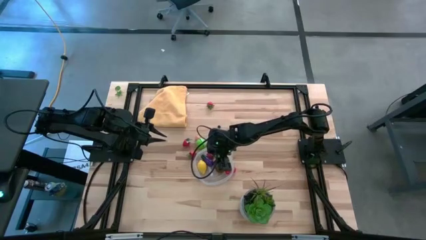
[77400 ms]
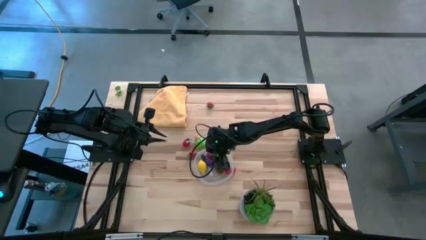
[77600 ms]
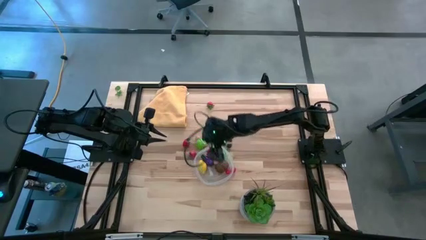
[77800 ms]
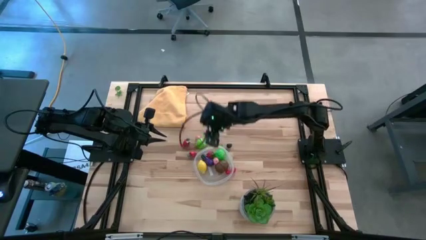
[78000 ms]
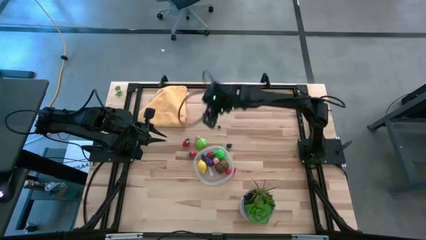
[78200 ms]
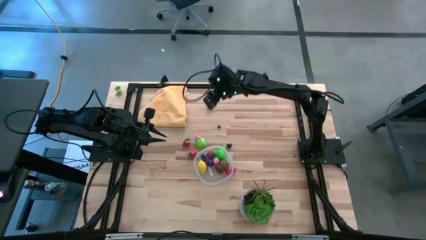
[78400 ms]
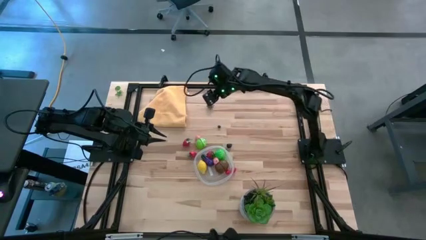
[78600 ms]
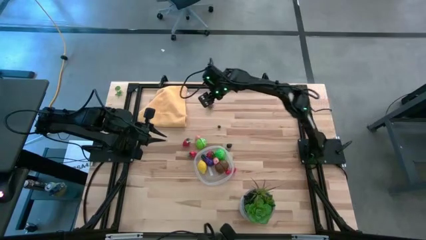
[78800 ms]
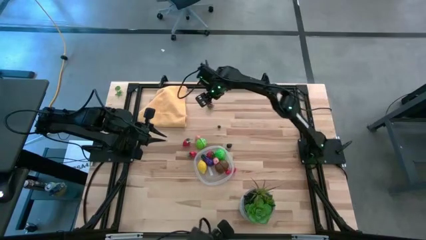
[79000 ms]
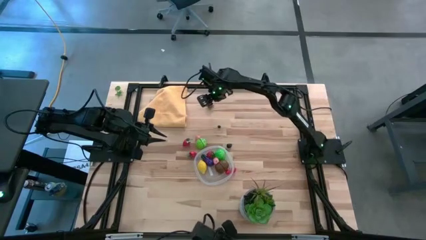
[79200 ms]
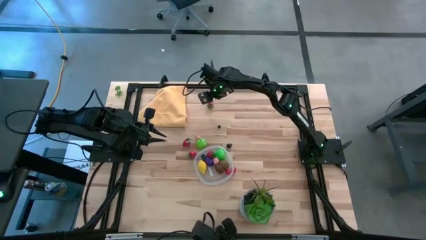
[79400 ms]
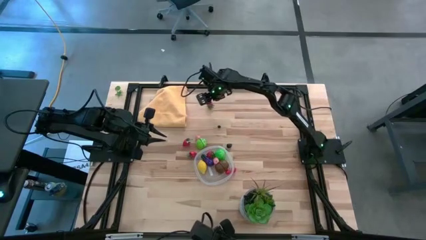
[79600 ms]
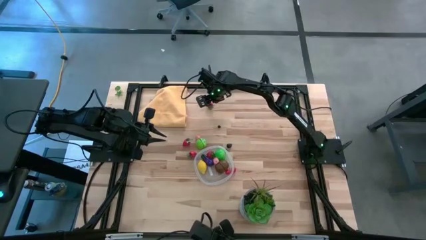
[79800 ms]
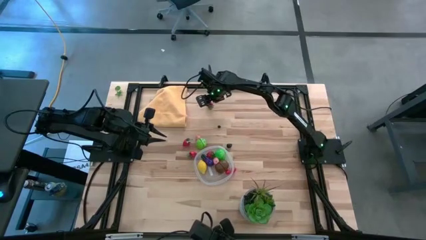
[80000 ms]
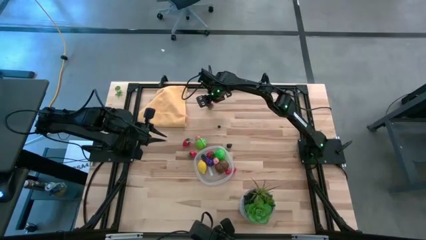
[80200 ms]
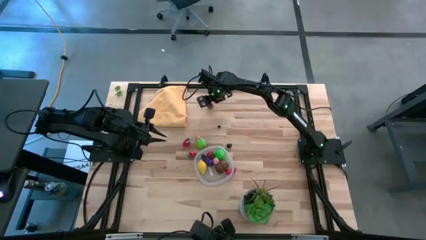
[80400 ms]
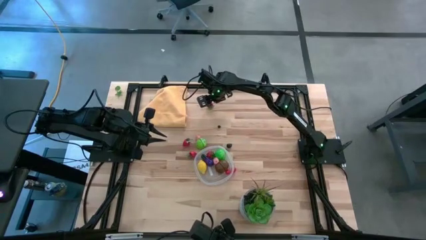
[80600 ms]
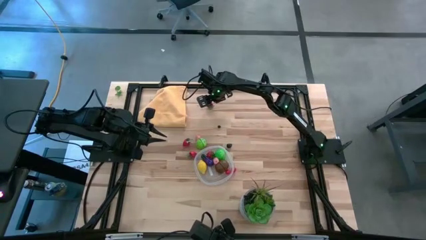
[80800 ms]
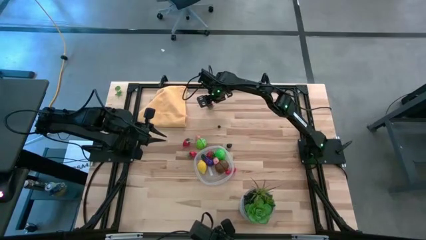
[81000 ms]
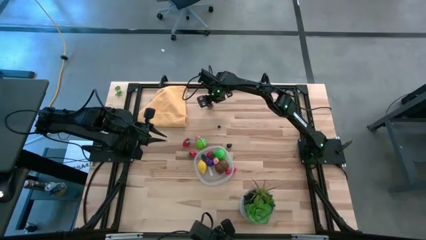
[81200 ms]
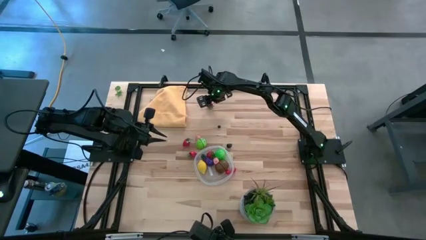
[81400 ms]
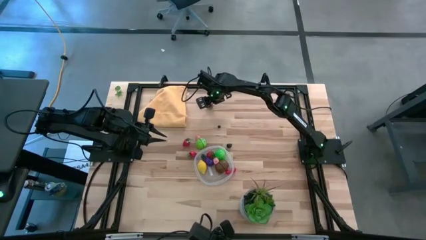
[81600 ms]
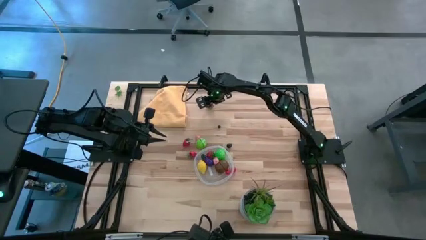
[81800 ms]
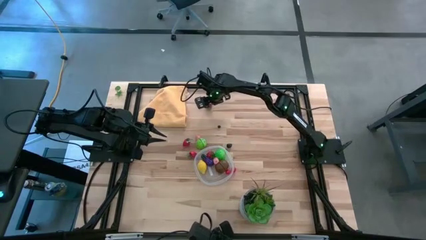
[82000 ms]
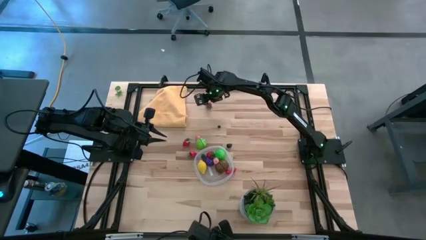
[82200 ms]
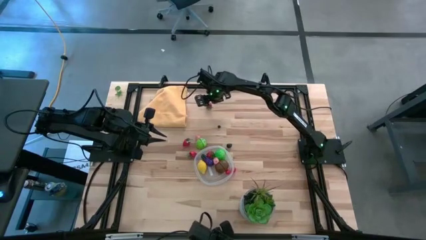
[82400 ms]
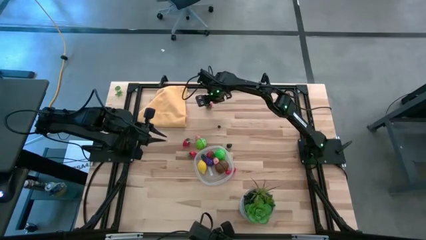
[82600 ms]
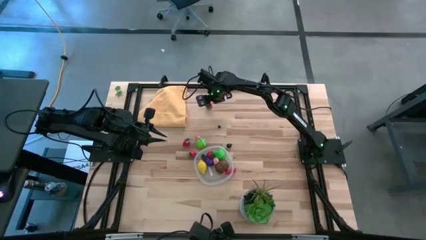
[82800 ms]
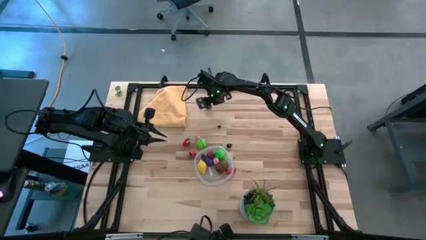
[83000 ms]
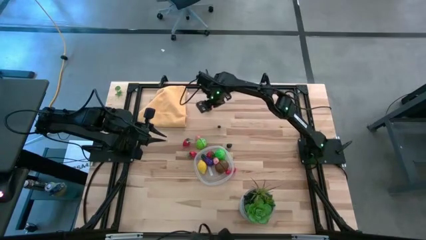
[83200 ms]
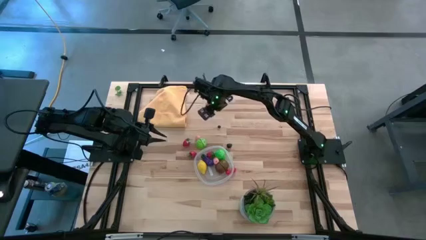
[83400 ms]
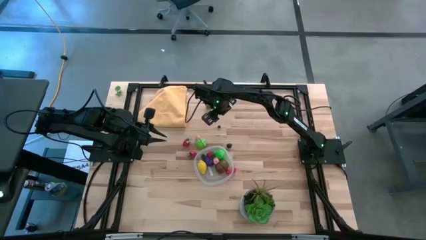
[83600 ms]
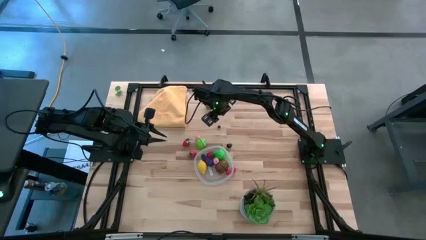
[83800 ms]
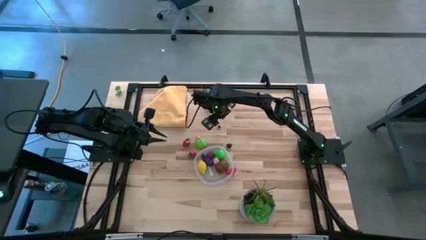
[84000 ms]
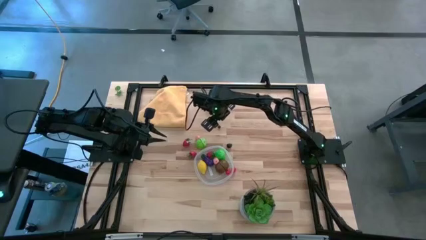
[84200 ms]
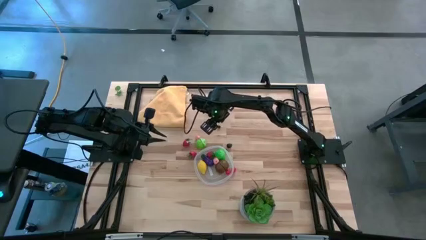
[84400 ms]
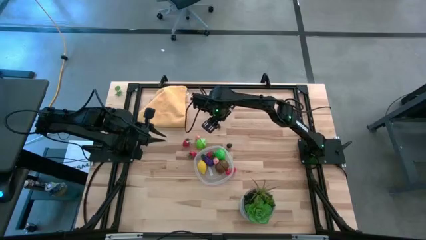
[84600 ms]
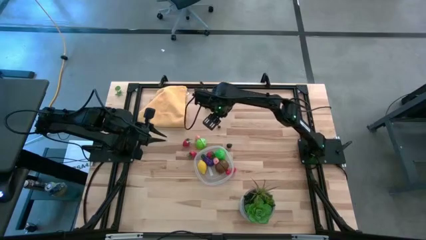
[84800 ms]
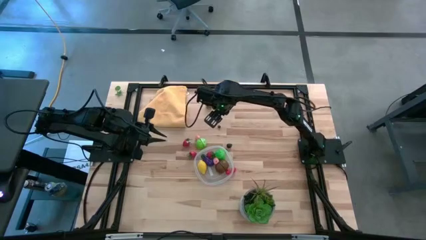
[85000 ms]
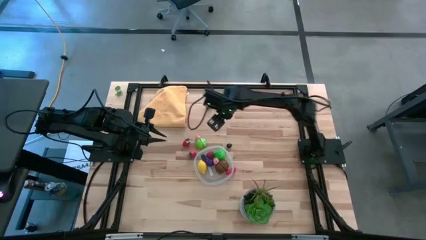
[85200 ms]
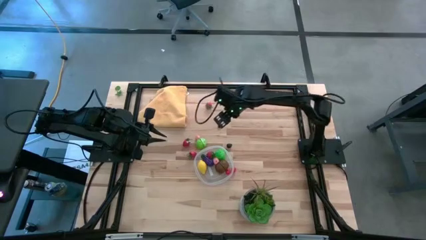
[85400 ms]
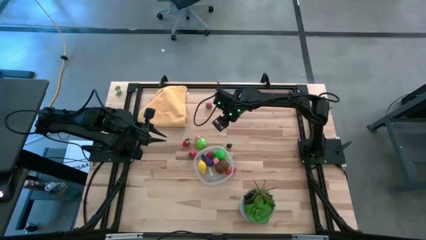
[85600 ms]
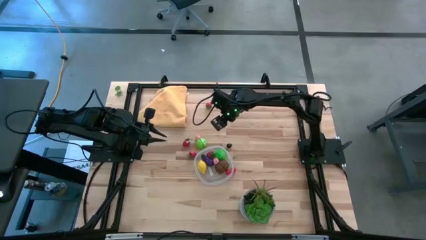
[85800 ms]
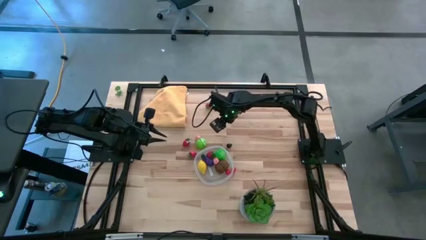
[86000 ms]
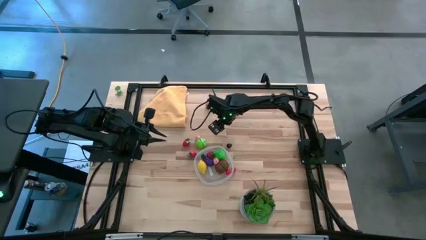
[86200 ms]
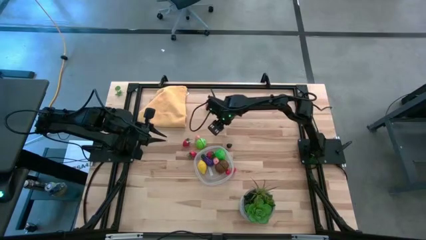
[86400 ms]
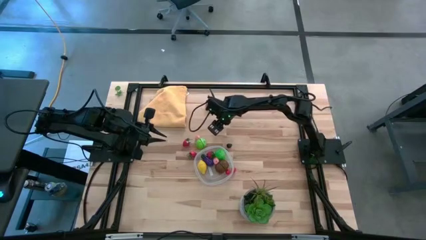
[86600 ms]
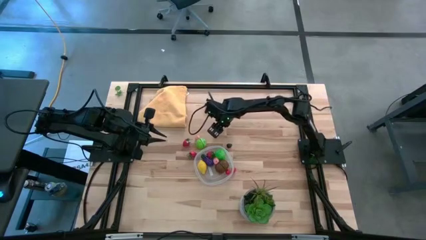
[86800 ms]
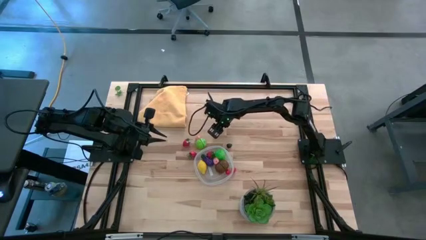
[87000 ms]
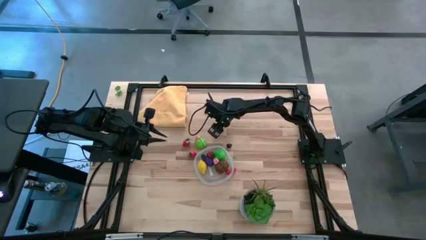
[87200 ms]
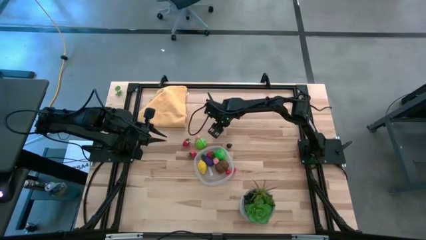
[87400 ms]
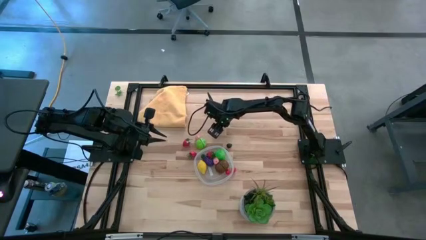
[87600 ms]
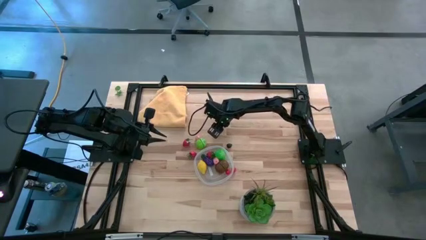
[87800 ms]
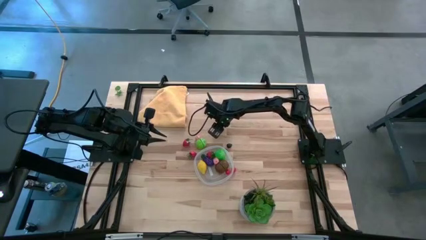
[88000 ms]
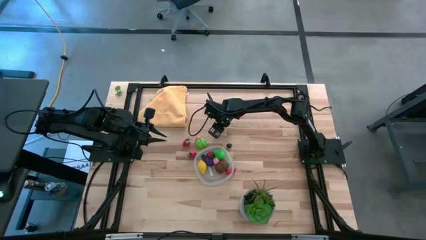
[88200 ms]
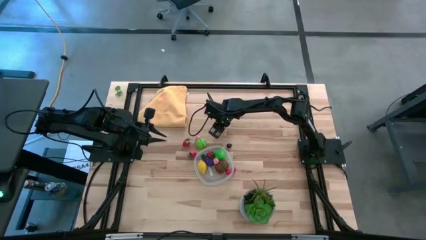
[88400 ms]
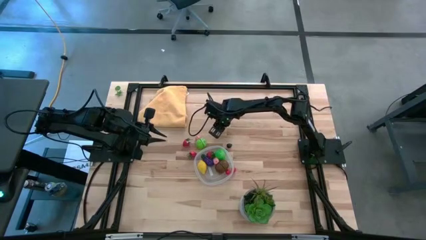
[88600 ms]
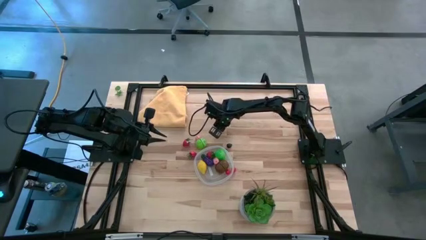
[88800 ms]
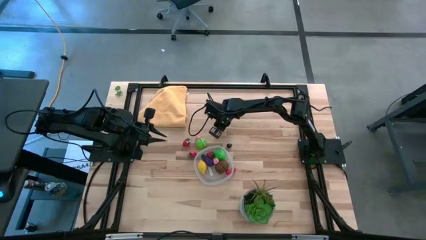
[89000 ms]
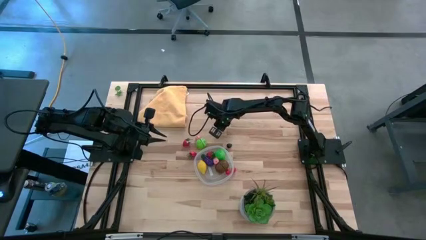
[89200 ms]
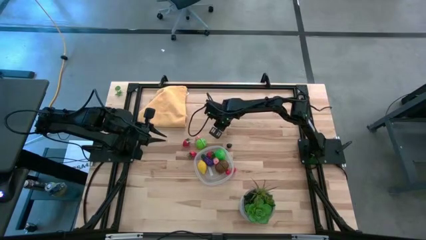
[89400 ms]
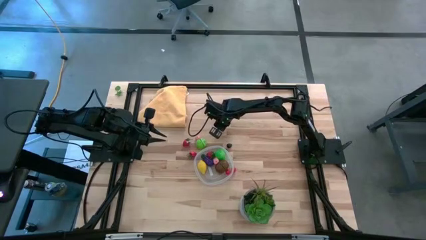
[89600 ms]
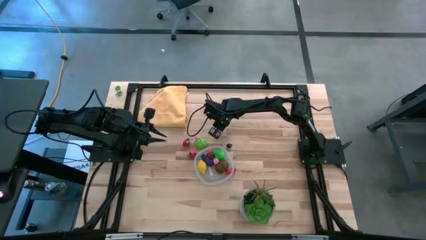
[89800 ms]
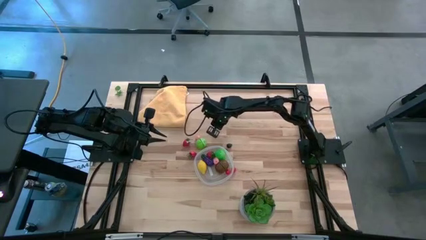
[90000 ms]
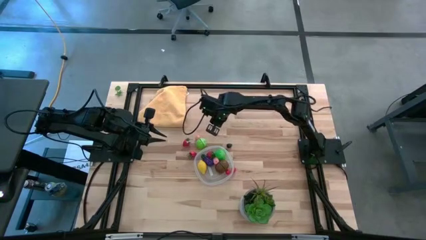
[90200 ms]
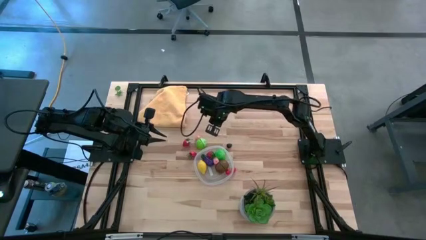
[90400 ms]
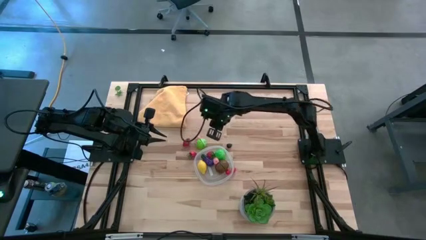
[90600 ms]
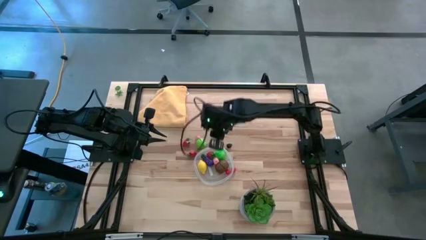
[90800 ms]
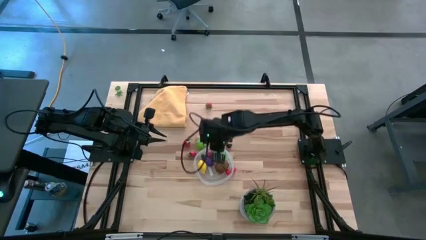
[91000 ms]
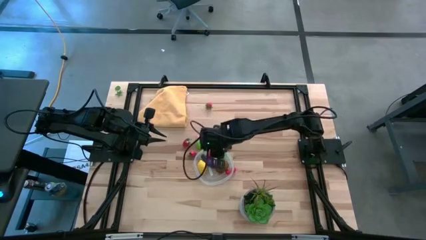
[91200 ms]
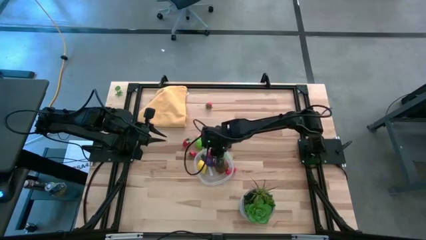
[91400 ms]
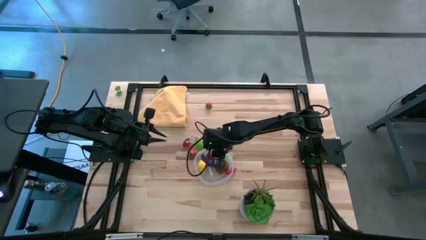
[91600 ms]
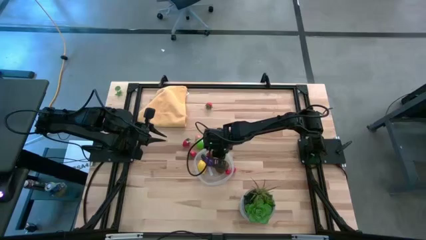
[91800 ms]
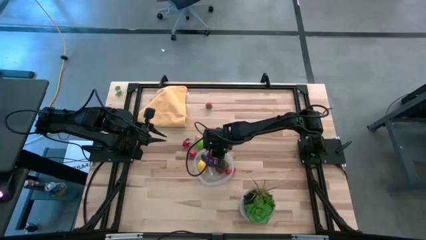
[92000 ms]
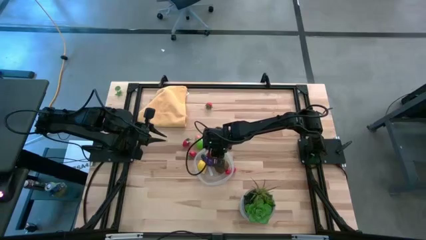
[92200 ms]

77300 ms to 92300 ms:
Task: Pick and placing Produce into tupperware
Put the blueberries into the transparent bin

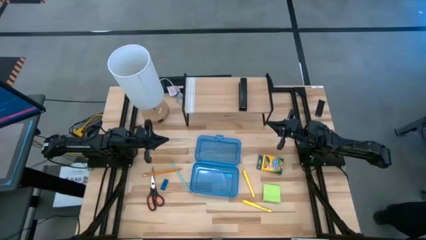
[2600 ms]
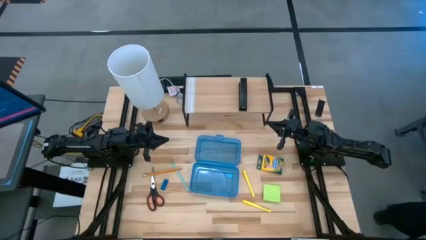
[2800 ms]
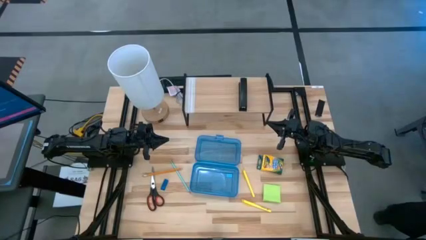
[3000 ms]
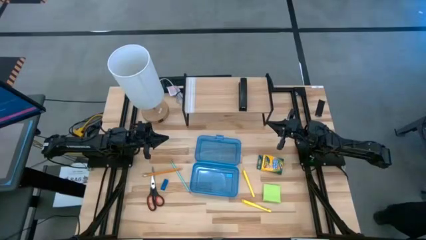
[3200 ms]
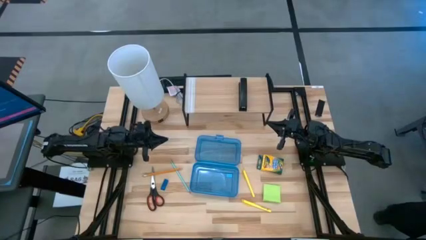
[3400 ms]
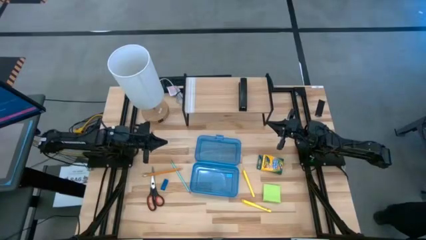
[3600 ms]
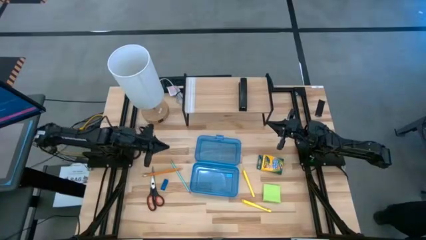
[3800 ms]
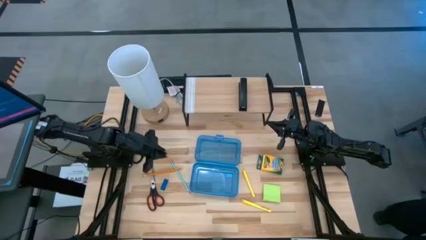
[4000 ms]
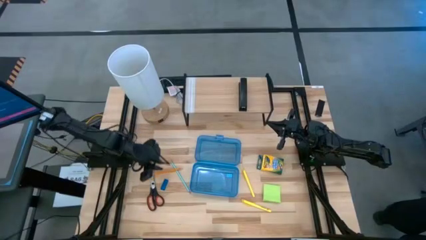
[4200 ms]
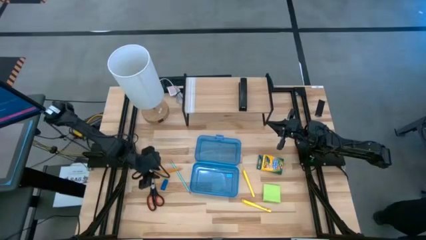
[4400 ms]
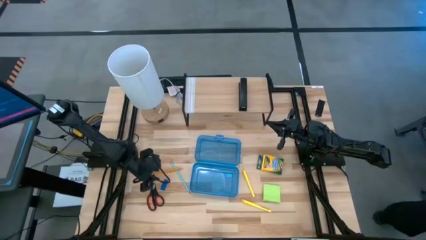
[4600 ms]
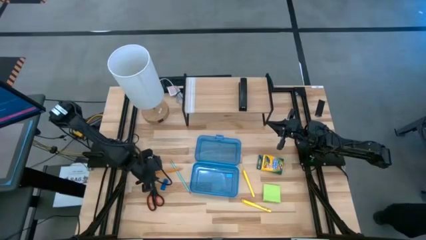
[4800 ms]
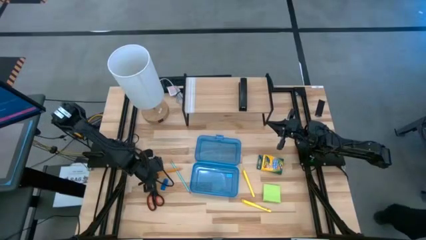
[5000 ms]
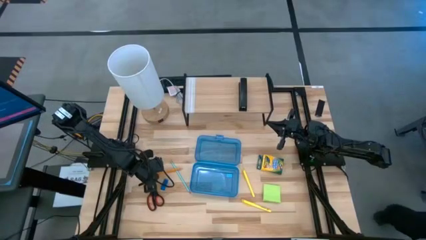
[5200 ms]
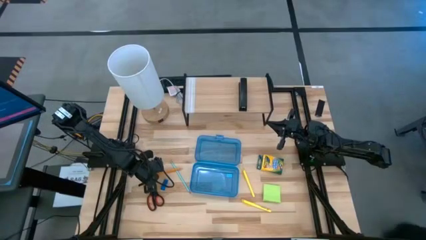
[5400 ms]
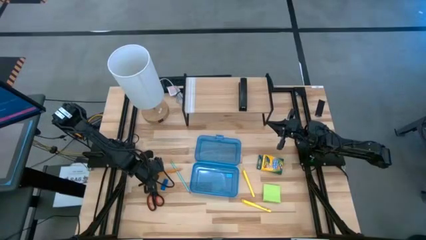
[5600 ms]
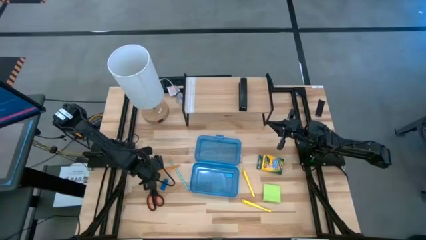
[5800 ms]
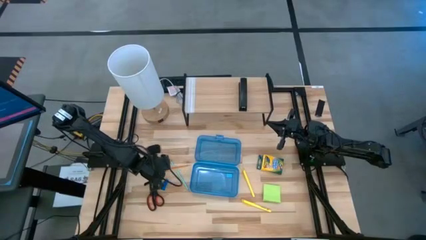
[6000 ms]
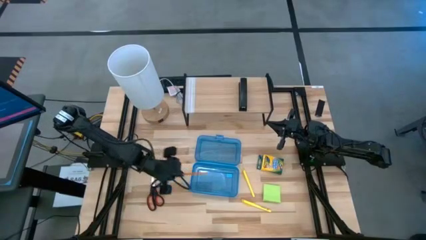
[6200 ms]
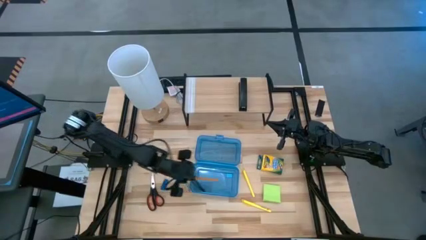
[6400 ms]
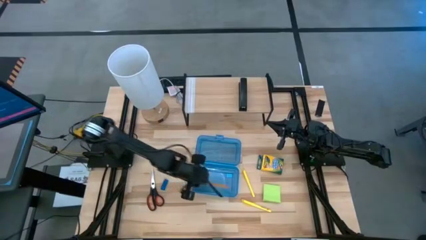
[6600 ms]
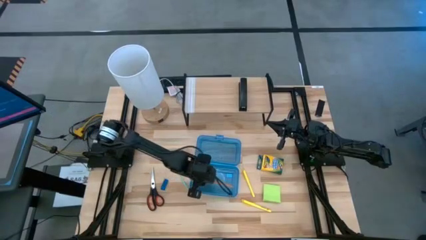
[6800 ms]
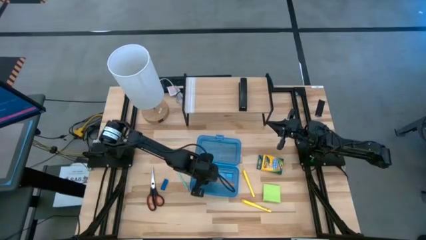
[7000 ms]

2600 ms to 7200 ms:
Task: Pack school essentials
Put the orange pencil into the blue supply box
